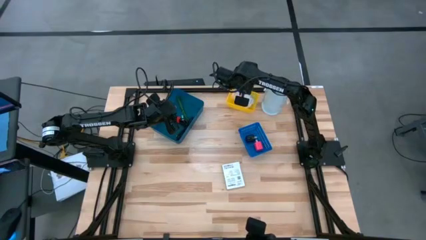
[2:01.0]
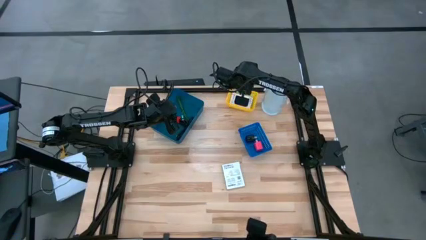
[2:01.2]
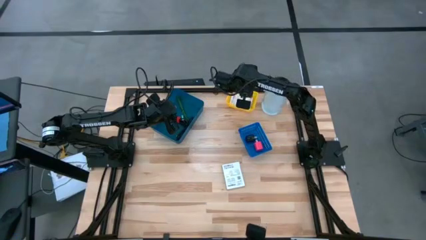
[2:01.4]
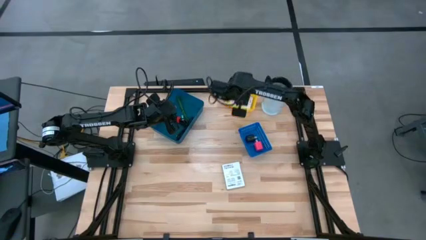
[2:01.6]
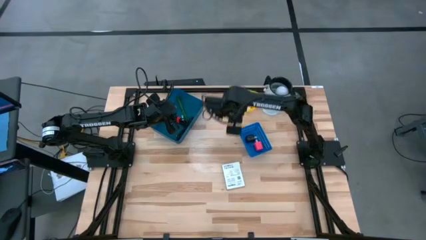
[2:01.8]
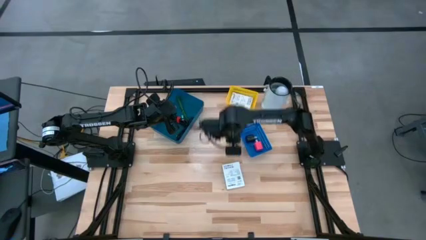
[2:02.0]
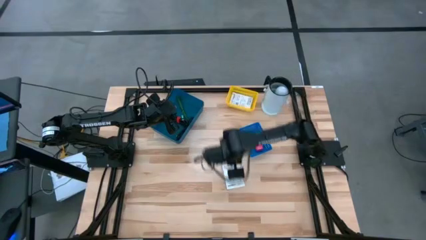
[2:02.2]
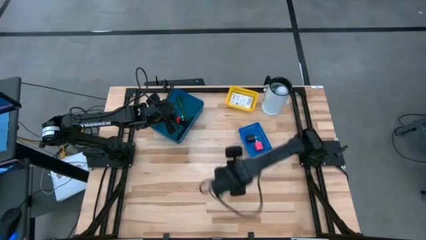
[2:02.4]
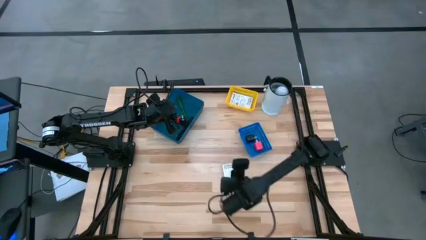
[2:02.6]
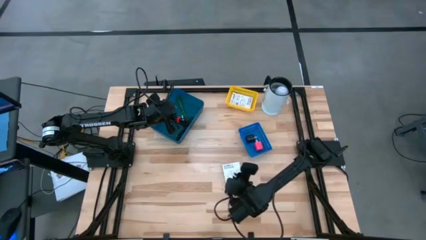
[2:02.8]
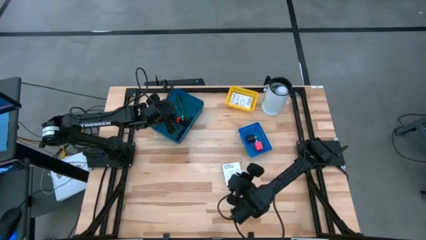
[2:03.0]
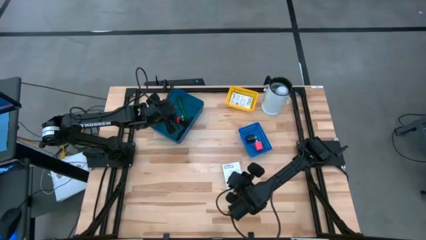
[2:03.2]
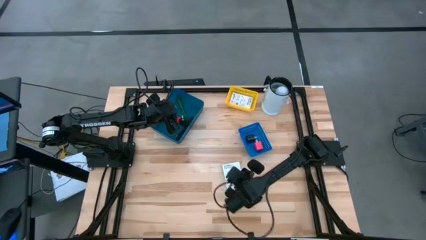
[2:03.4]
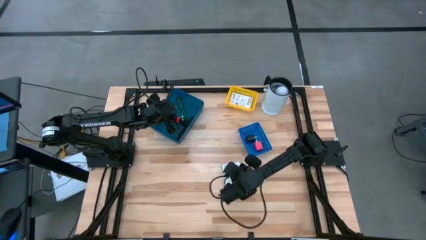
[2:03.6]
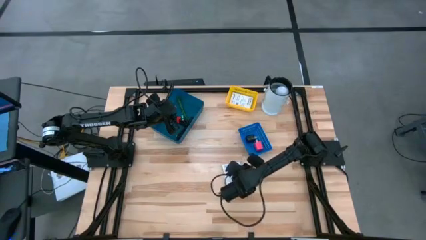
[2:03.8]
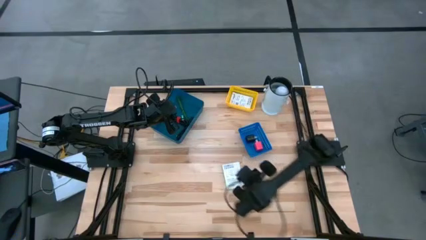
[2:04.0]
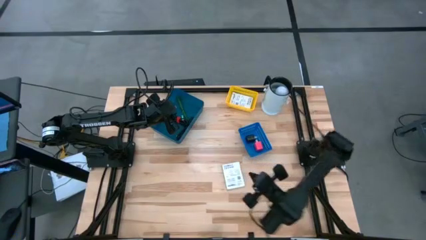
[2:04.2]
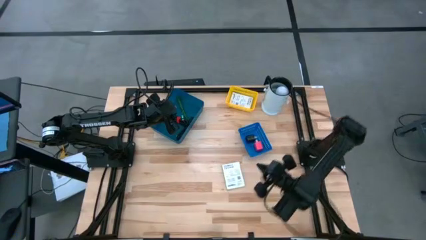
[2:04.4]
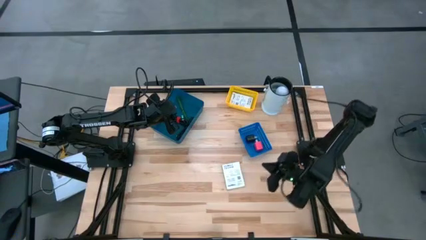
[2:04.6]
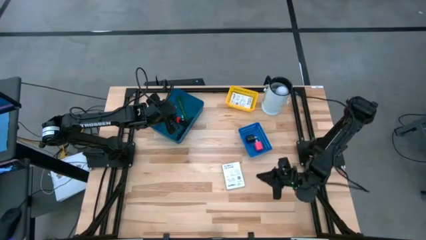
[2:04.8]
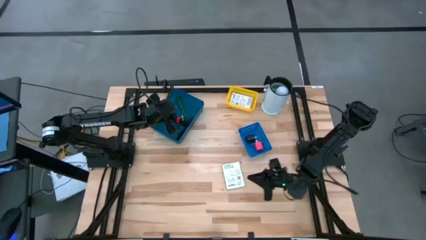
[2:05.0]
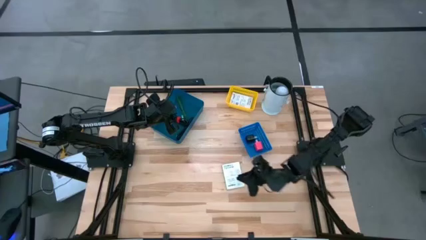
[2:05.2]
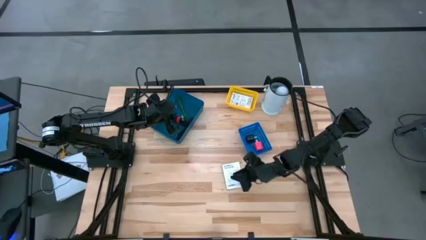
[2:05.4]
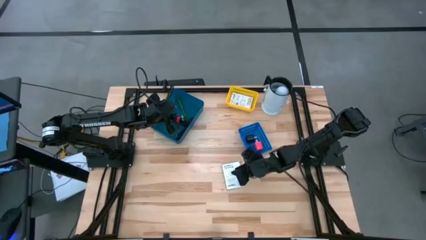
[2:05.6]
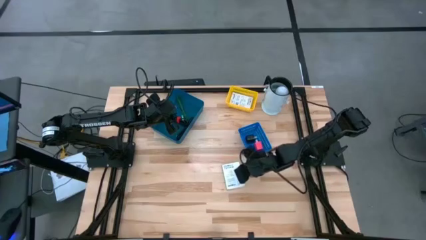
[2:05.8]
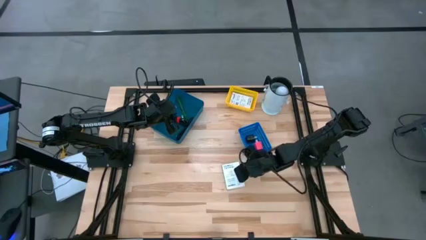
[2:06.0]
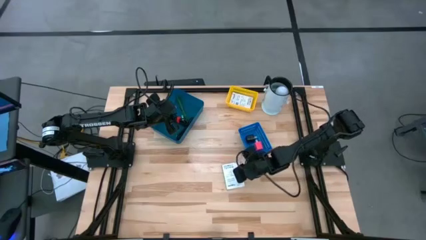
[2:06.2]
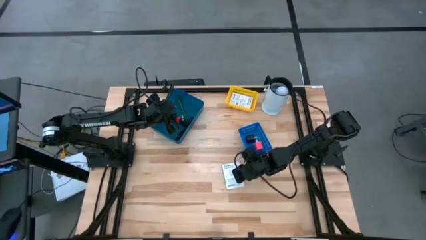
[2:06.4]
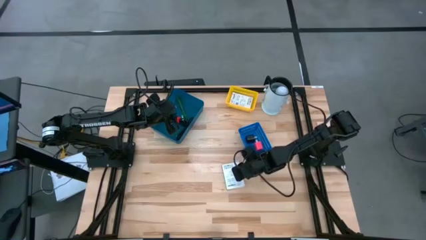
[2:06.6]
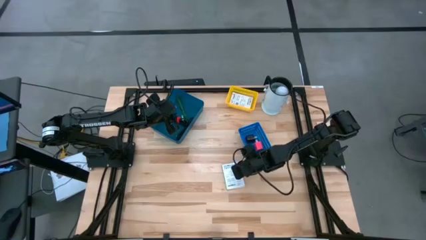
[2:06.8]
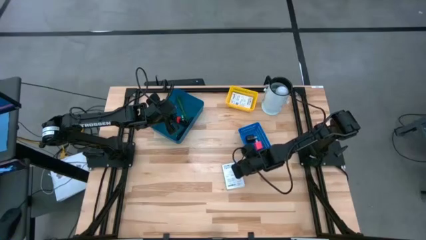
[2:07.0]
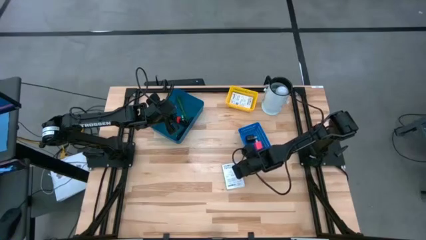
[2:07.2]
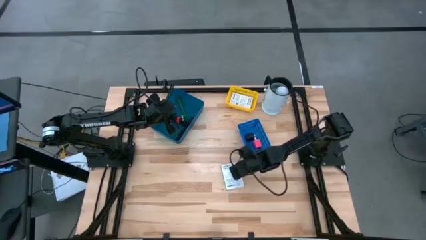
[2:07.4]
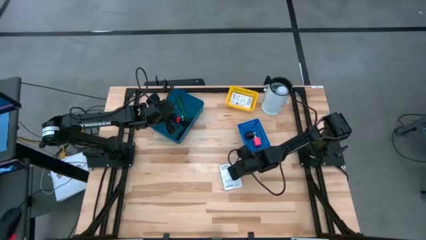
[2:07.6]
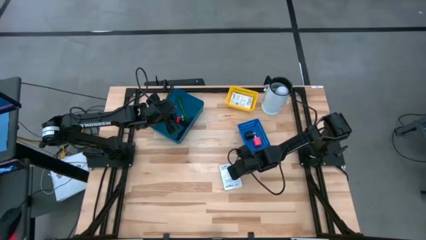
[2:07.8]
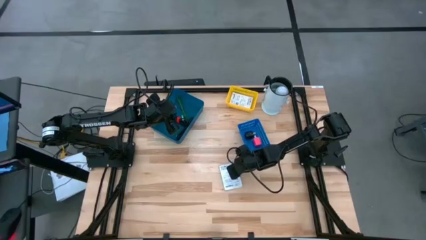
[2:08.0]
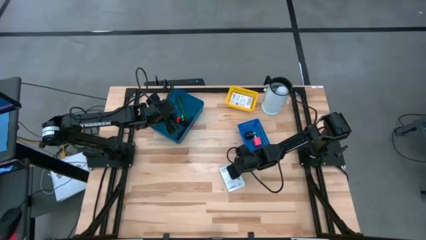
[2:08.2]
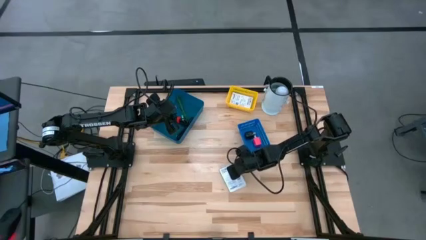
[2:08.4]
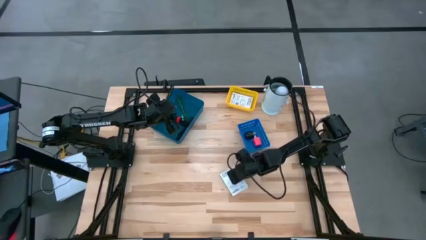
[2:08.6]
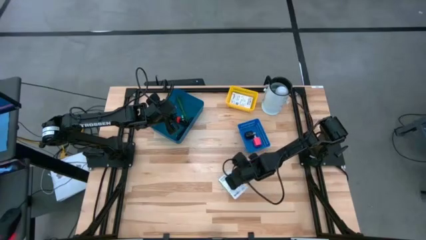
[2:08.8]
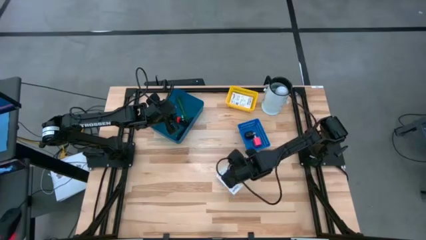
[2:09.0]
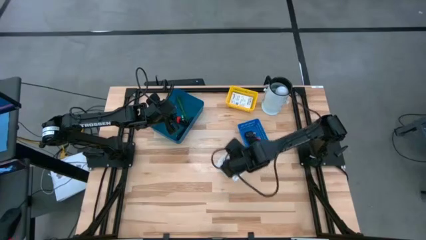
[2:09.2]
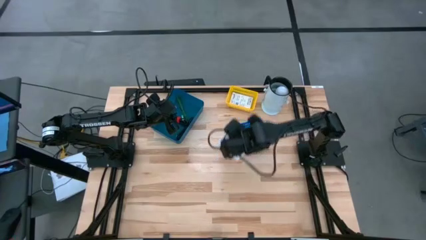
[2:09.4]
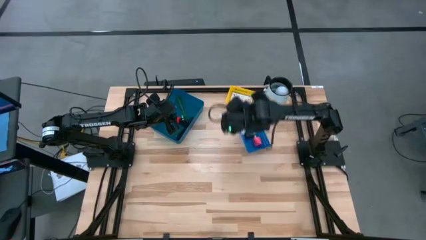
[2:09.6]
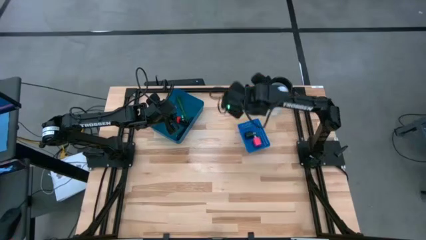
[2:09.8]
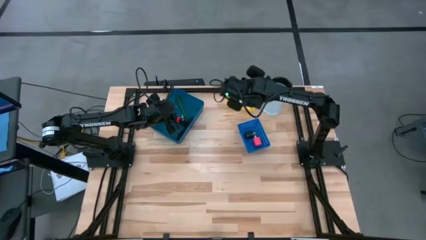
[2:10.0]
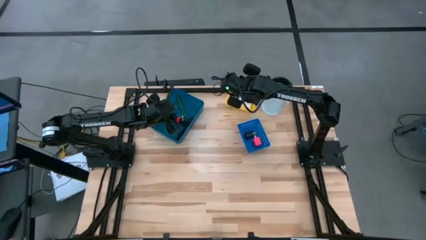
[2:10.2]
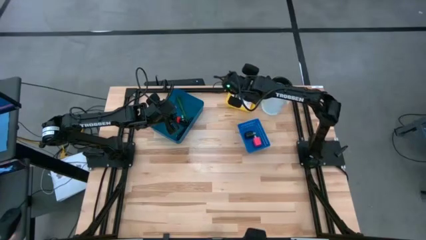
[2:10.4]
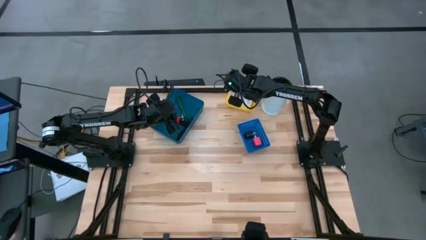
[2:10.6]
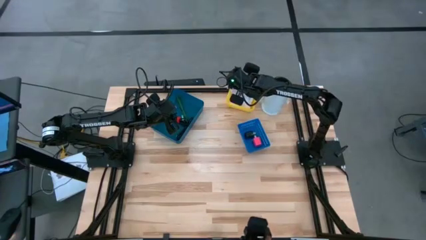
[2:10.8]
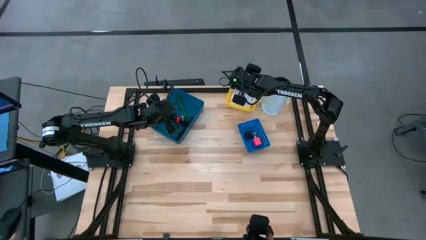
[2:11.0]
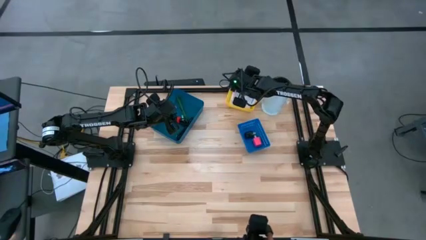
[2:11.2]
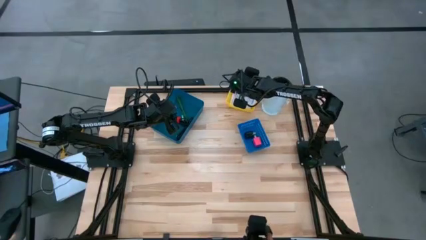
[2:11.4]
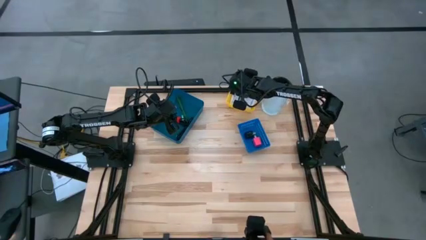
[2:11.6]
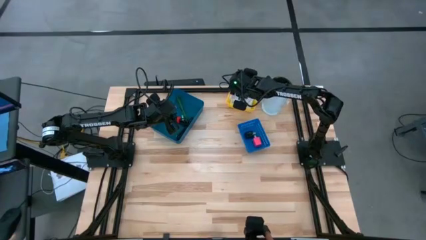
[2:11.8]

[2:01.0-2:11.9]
Task: Pick and place items into bin
Put the white card reader box into the yellow bin

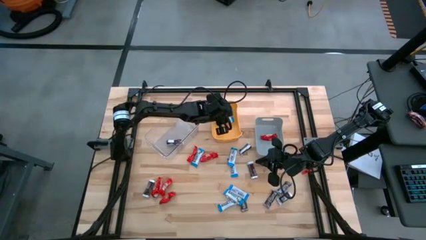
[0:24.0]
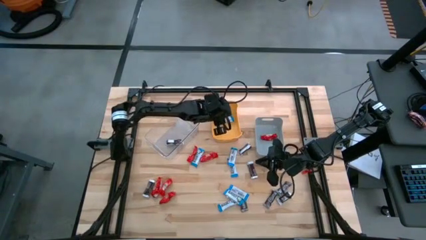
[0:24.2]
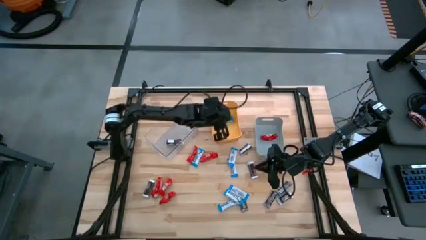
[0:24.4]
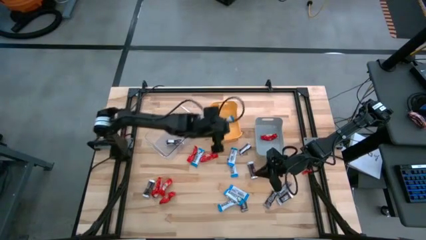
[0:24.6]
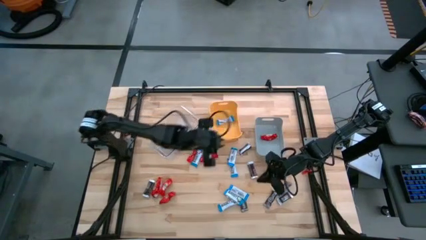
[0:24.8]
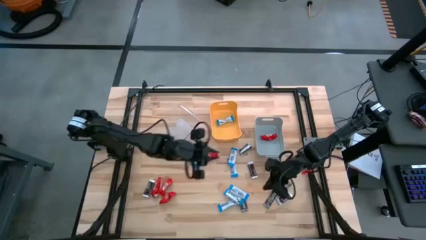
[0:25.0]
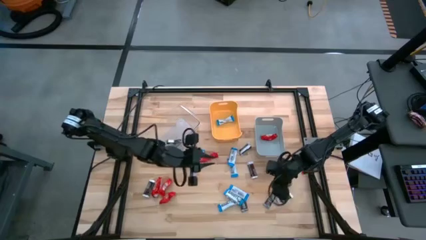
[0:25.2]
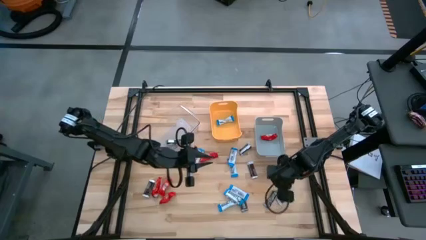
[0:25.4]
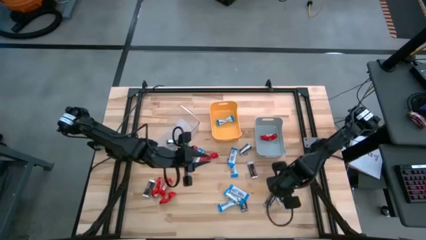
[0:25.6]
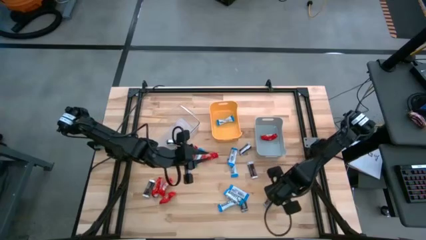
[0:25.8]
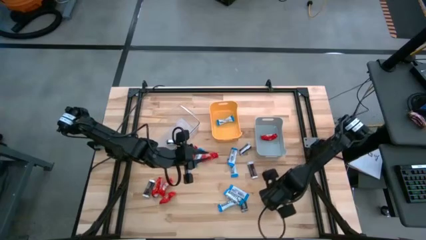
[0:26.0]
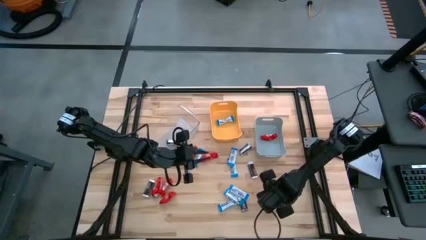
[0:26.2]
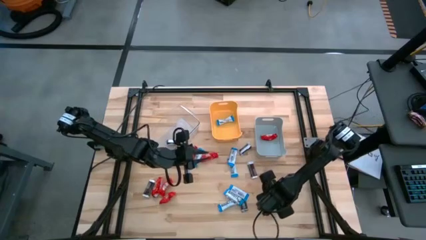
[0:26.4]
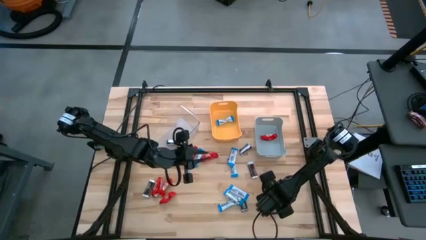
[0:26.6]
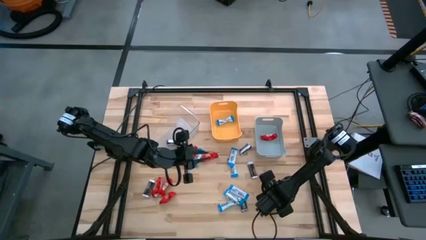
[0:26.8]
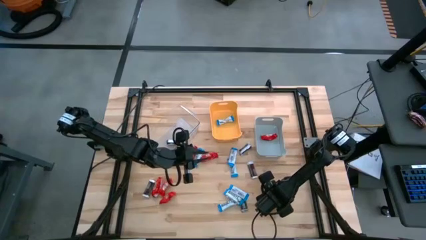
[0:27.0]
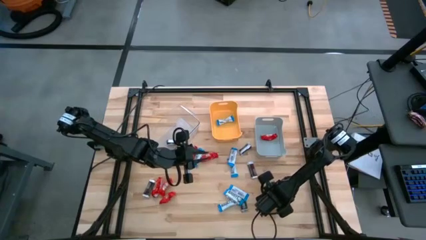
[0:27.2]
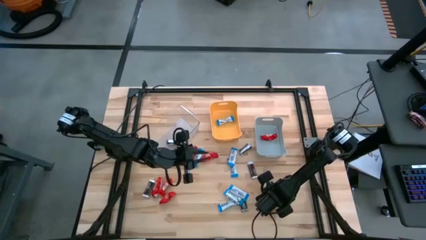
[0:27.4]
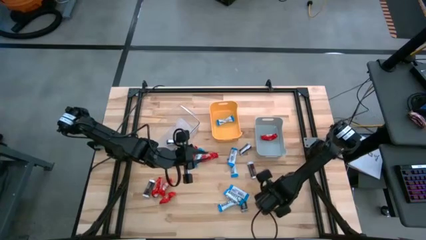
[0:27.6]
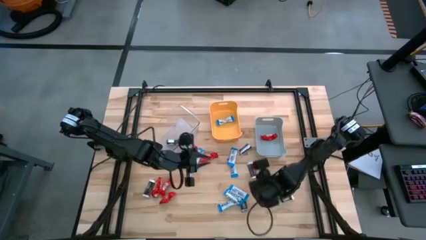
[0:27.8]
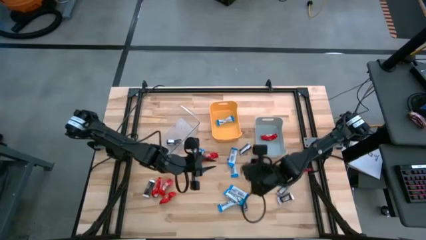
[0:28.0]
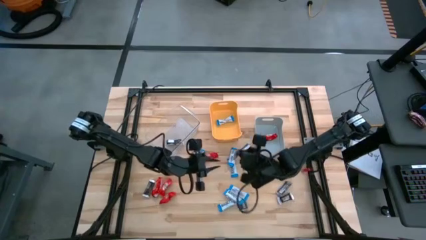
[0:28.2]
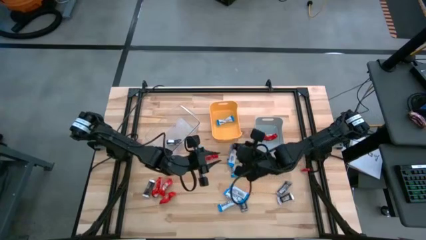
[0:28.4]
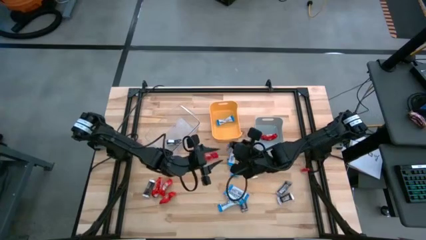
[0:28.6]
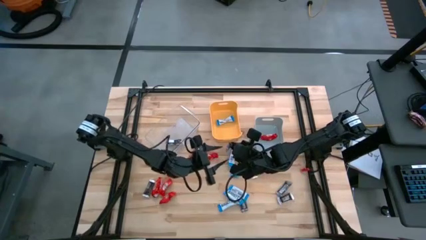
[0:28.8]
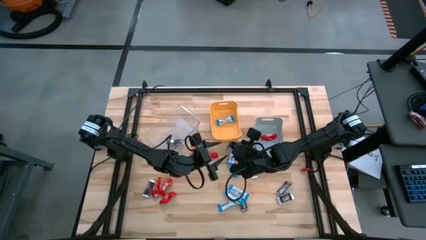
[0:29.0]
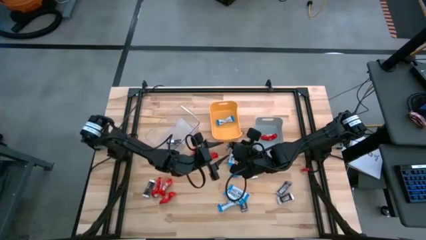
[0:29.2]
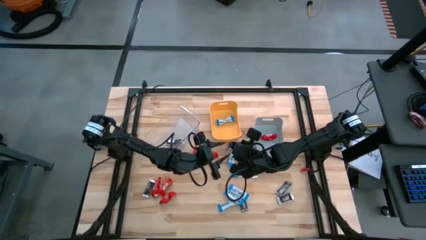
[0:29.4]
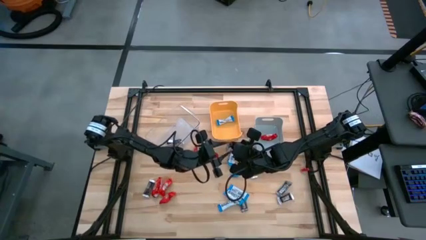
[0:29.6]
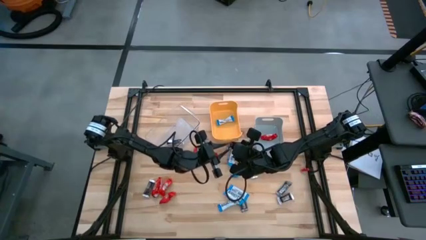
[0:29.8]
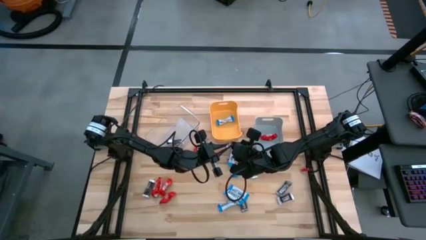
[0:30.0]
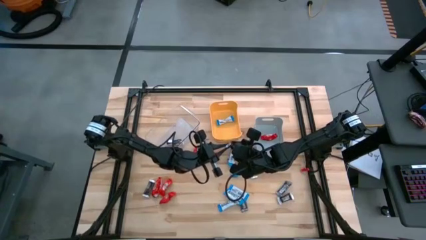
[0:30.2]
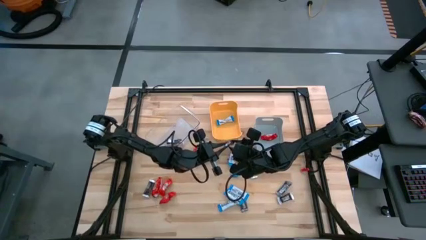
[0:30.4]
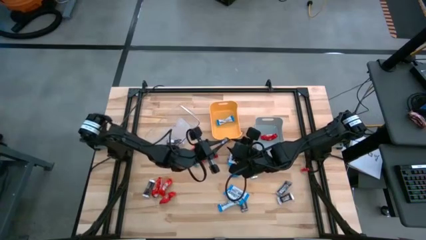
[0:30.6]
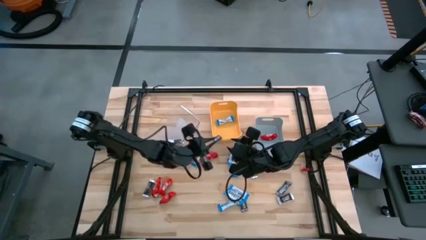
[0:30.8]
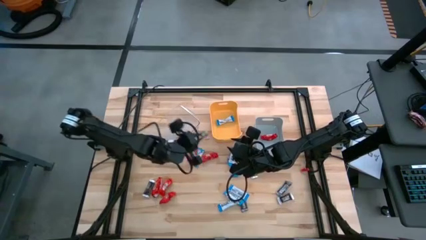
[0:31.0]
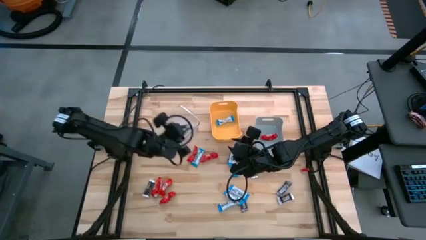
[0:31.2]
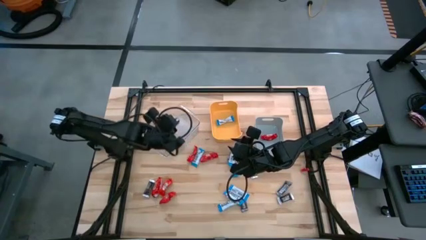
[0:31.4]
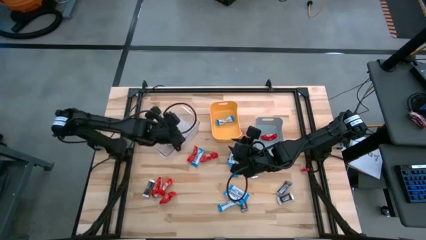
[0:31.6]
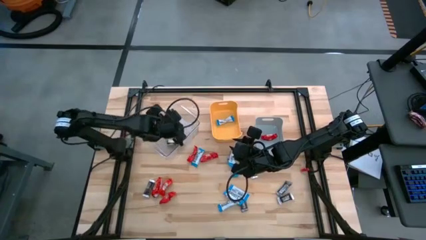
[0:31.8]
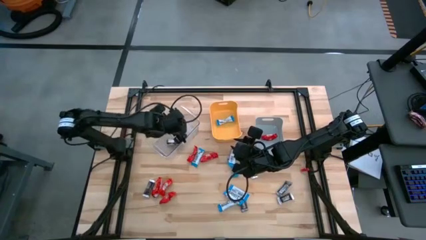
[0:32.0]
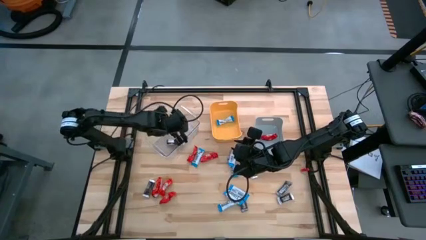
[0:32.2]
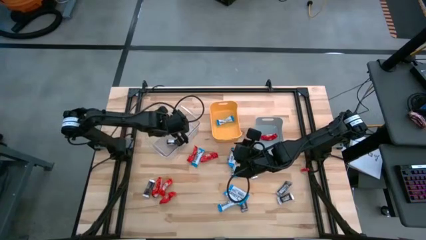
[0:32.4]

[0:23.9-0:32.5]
Task: Organize candy in baskets
Put the brown chocolate into the transparent bin
